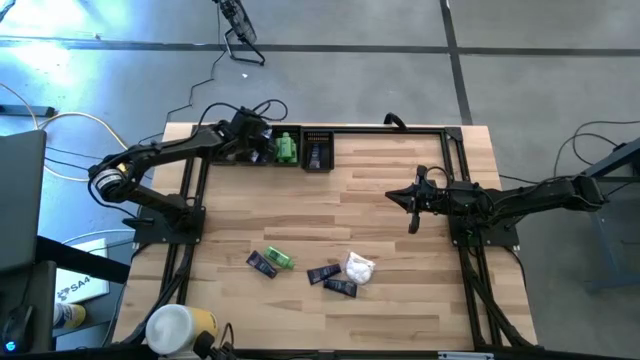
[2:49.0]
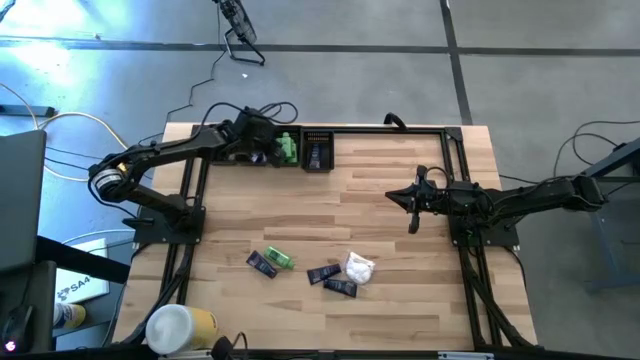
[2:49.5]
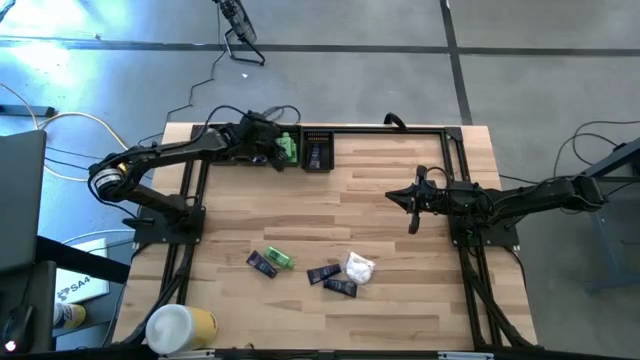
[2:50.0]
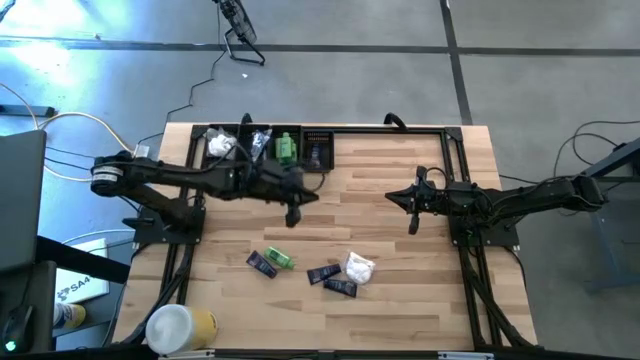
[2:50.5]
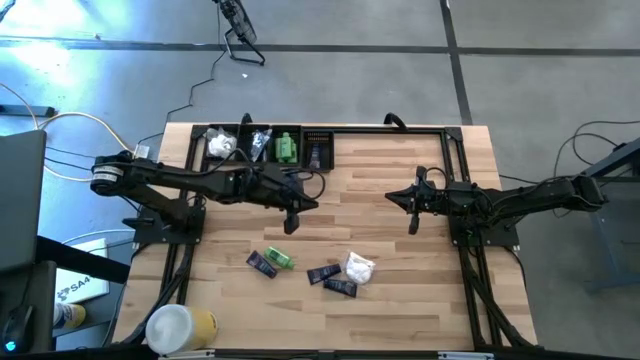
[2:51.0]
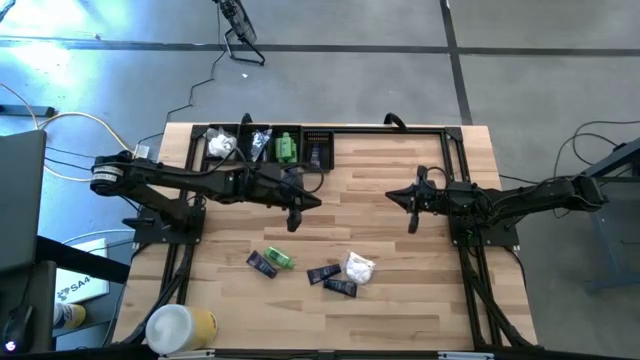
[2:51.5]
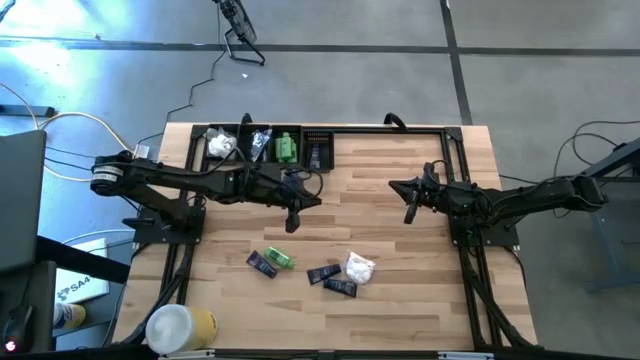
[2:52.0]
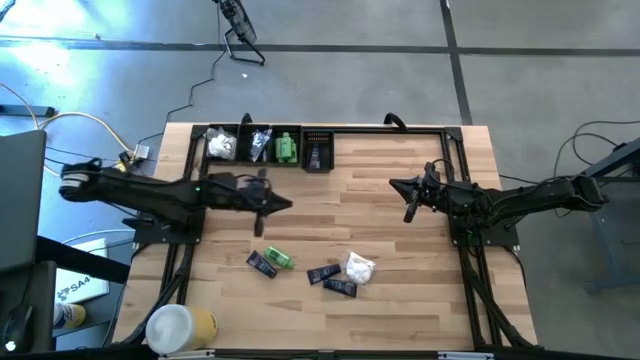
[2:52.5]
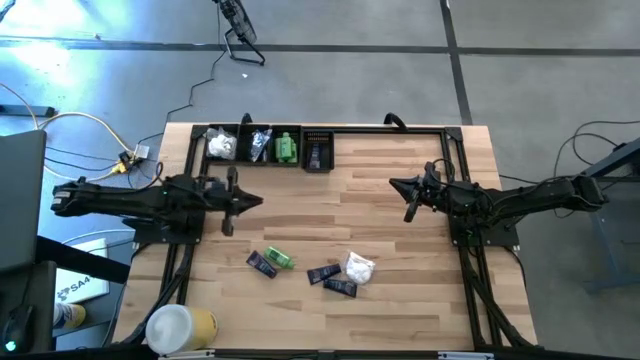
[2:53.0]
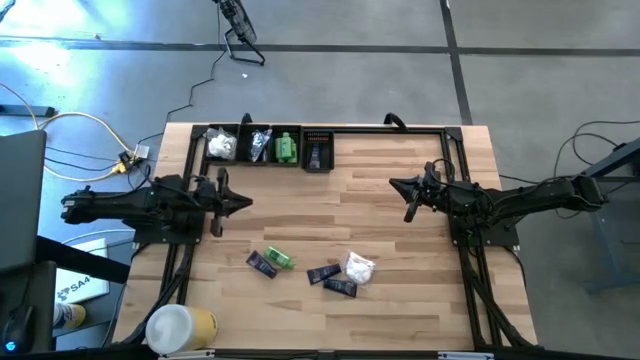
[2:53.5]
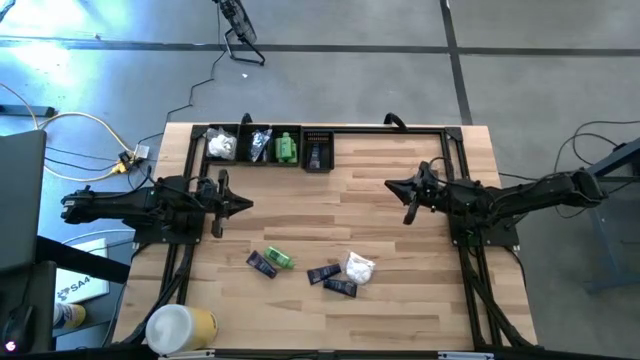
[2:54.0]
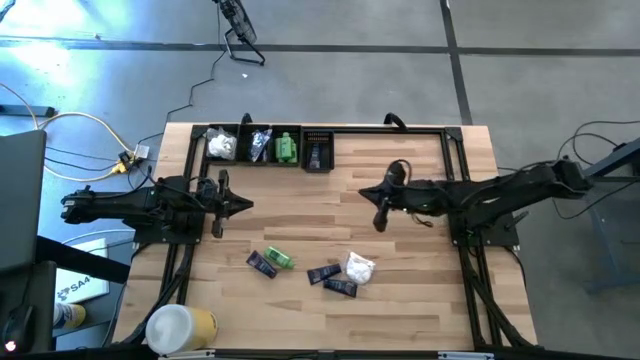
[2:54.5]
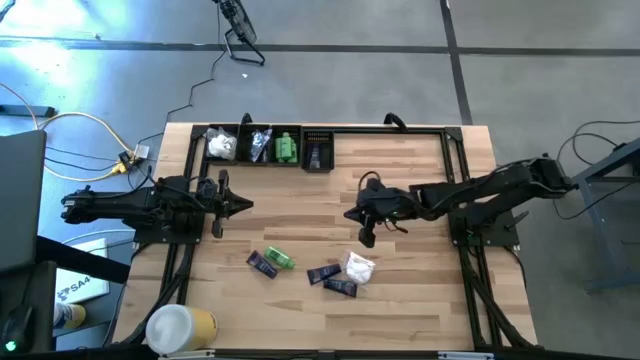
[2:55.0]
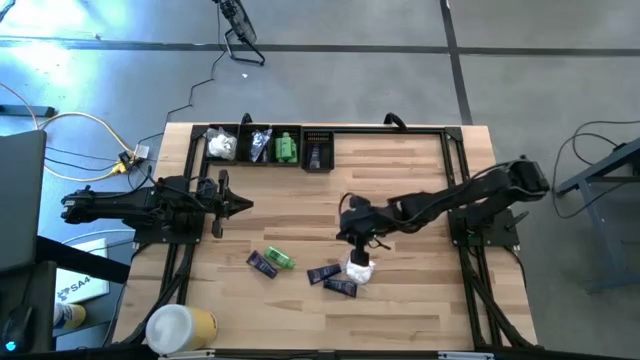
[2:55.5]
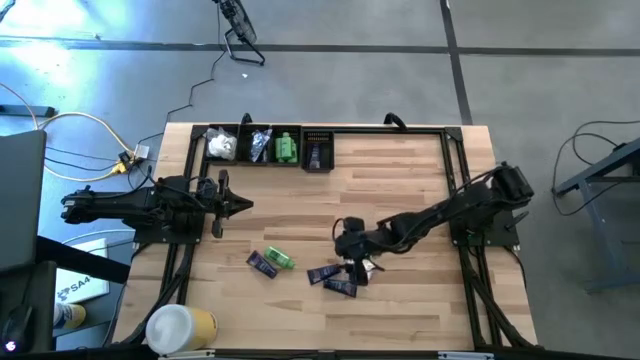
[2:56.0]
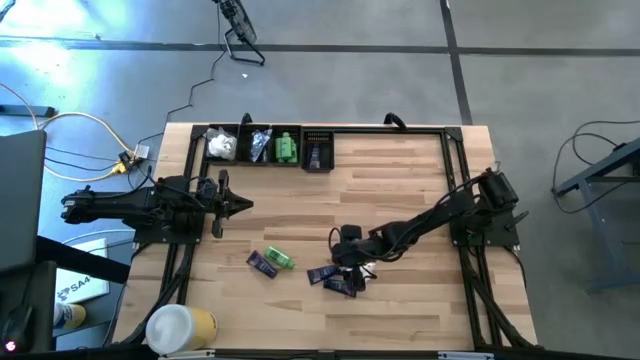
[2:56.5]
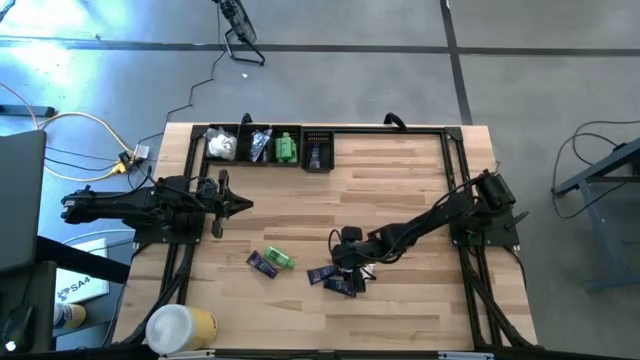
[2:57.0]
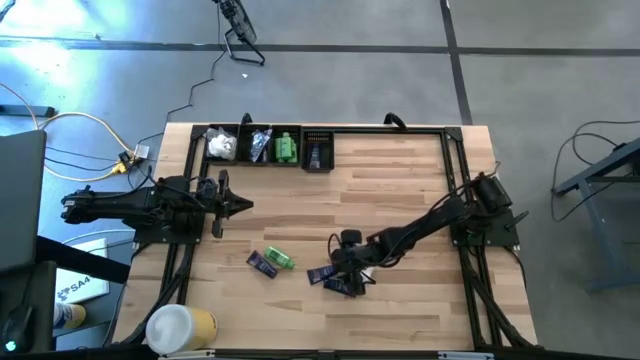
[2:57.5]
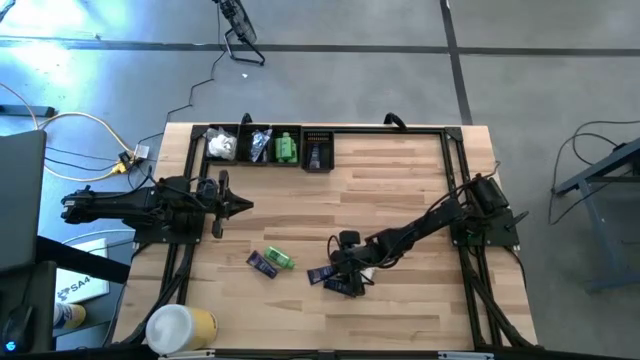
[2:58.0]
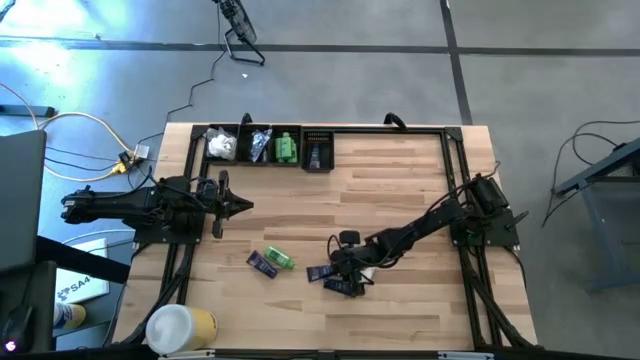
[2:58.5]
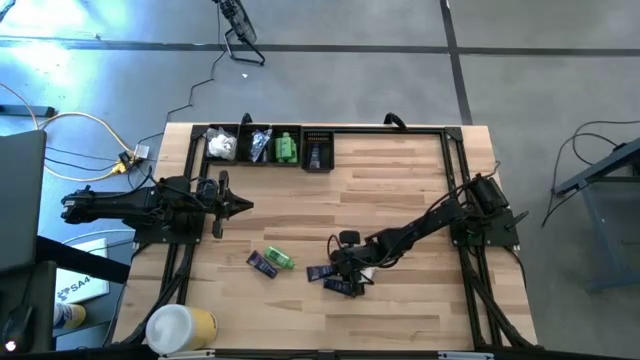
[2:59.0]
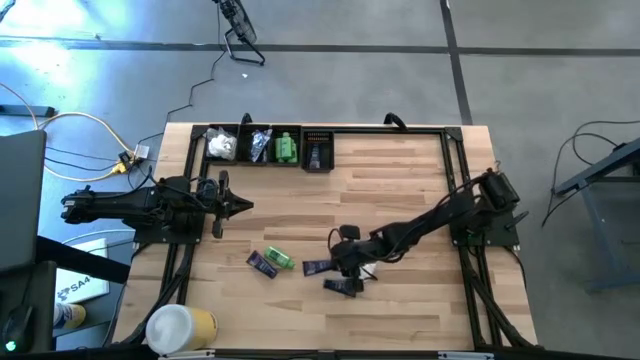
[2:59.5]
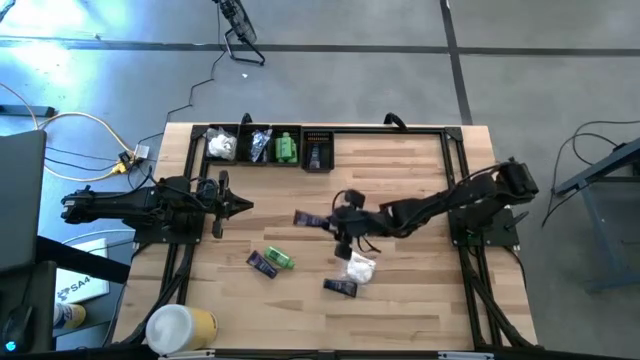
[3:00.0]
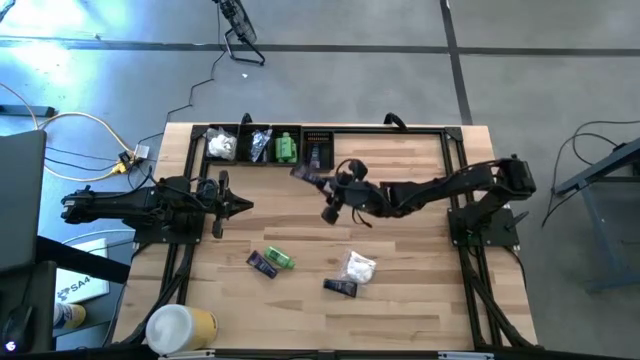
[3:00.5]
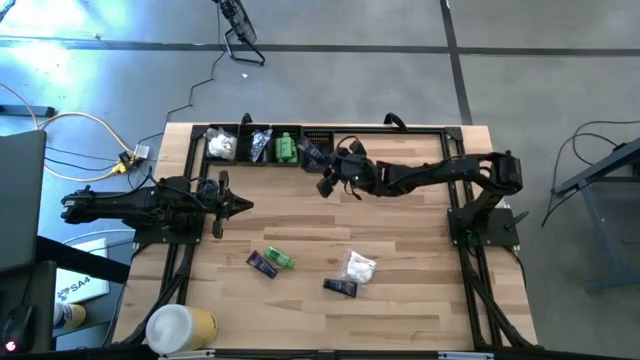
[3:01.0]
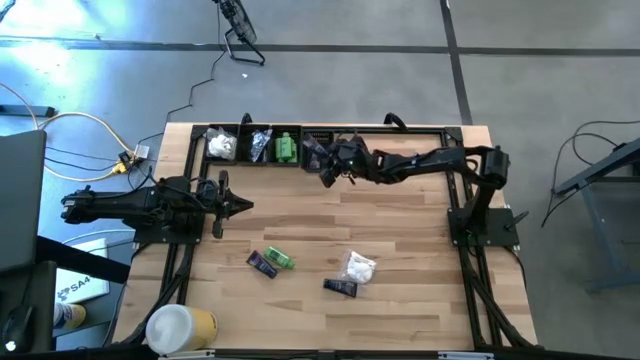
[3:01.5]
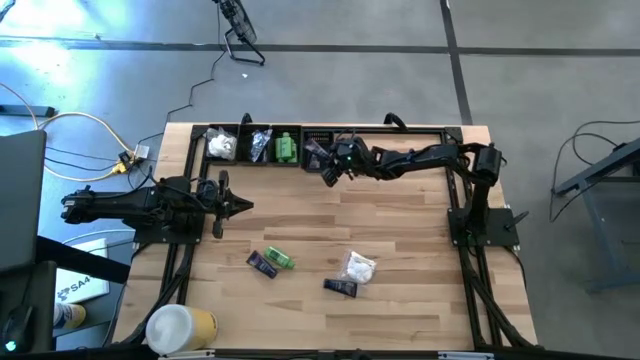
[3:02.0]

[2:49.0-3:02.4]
Task: Pick & Place Travel size toiletries
Put the shave cream into the right black bin

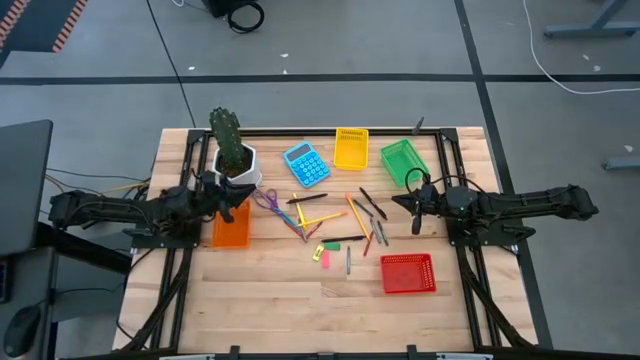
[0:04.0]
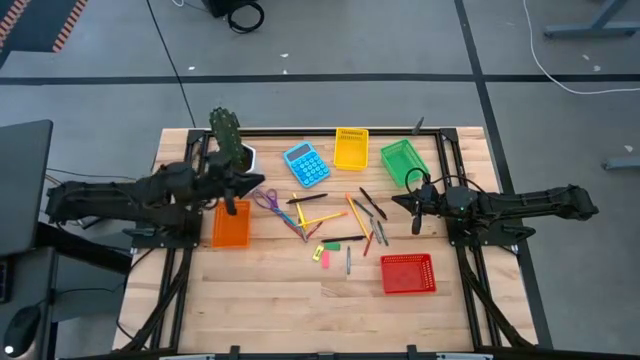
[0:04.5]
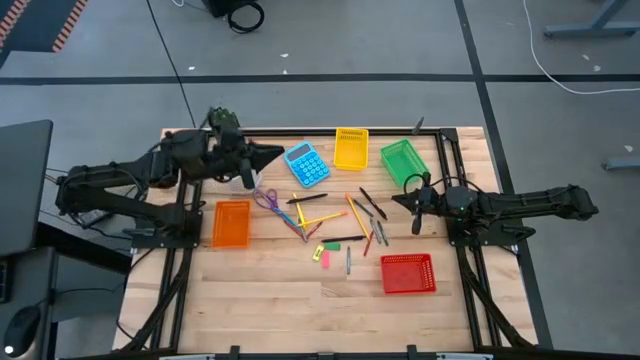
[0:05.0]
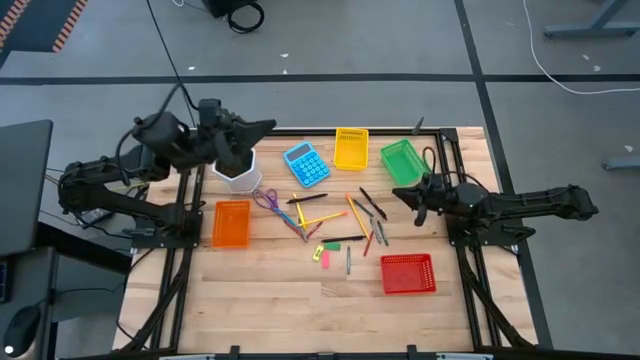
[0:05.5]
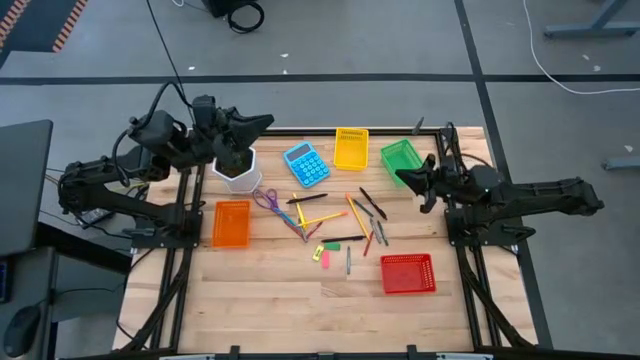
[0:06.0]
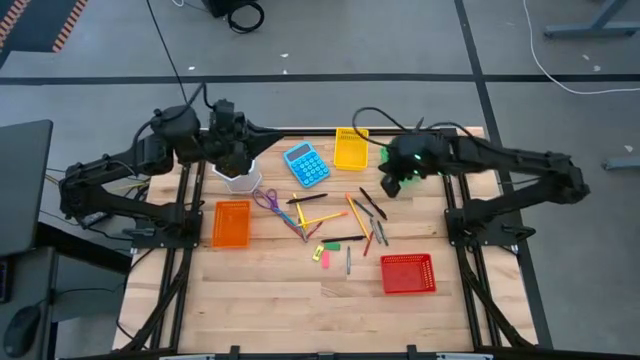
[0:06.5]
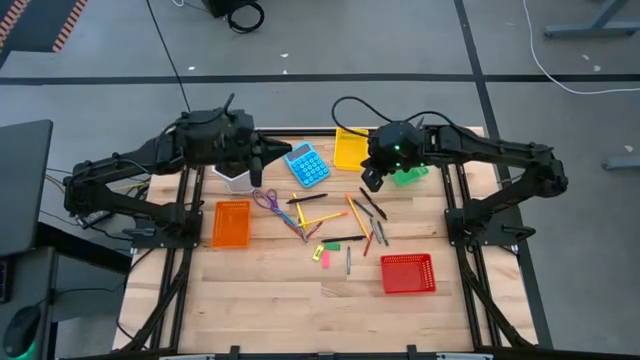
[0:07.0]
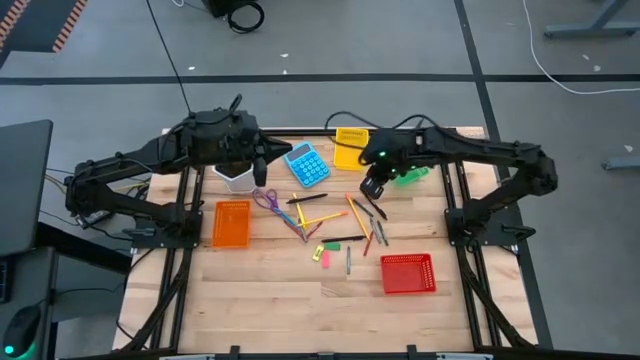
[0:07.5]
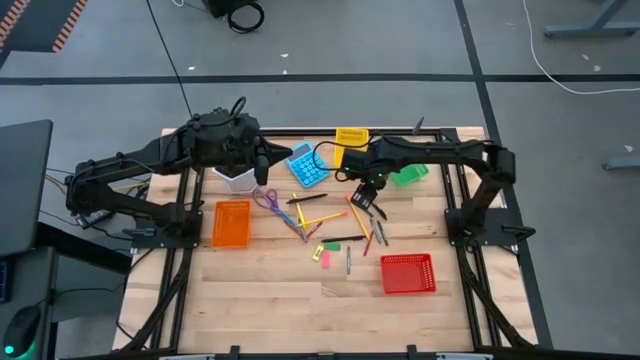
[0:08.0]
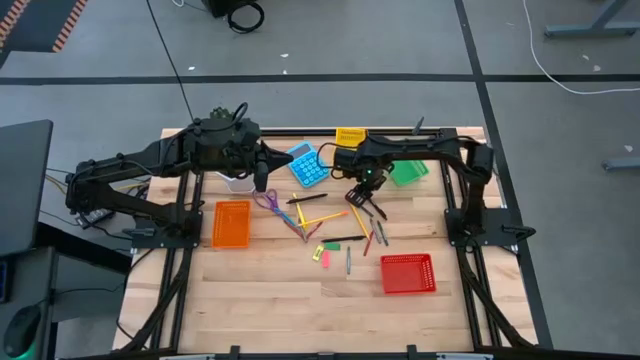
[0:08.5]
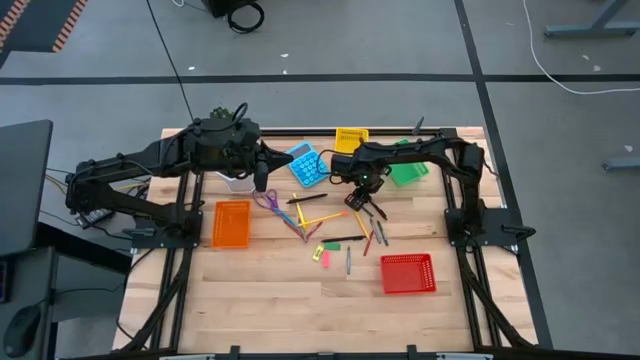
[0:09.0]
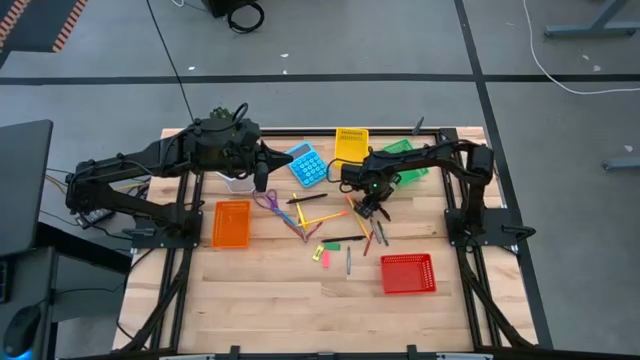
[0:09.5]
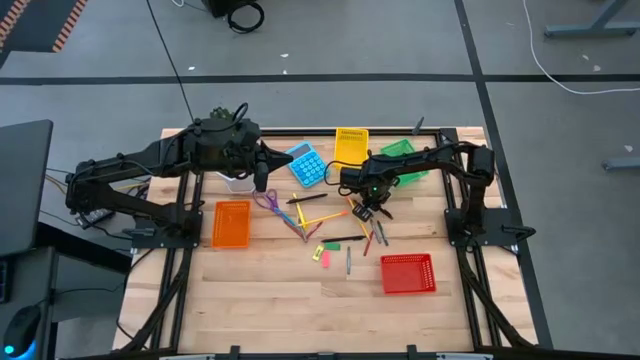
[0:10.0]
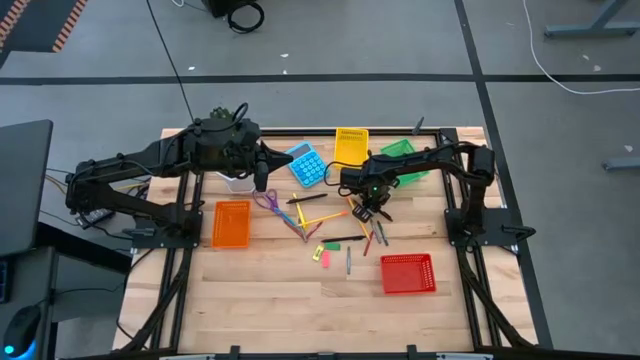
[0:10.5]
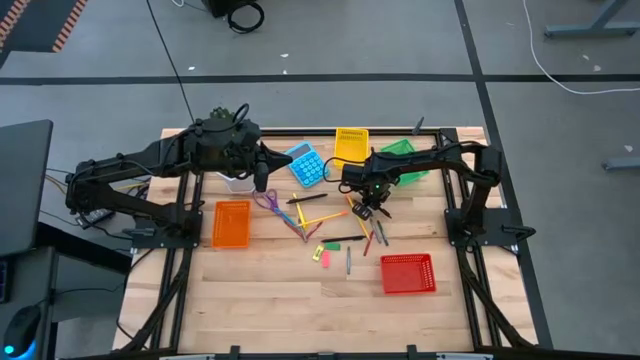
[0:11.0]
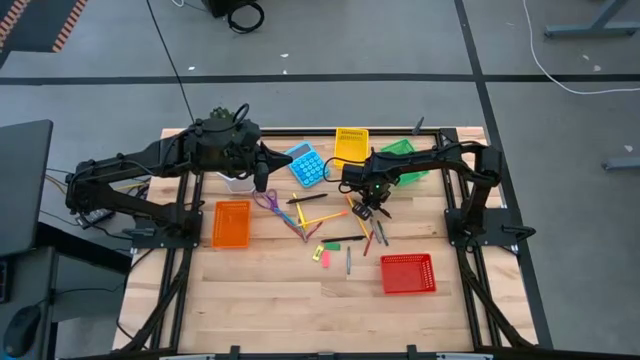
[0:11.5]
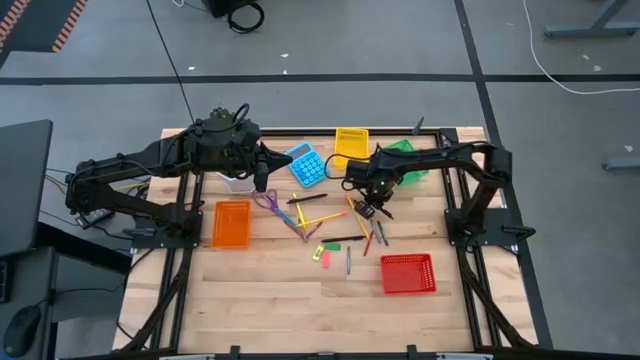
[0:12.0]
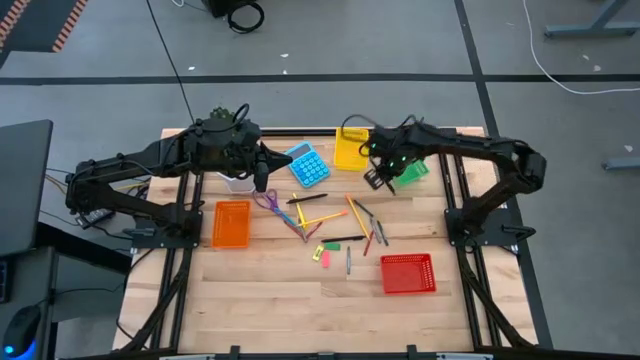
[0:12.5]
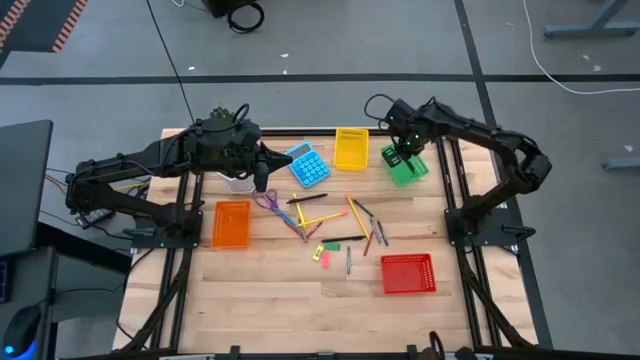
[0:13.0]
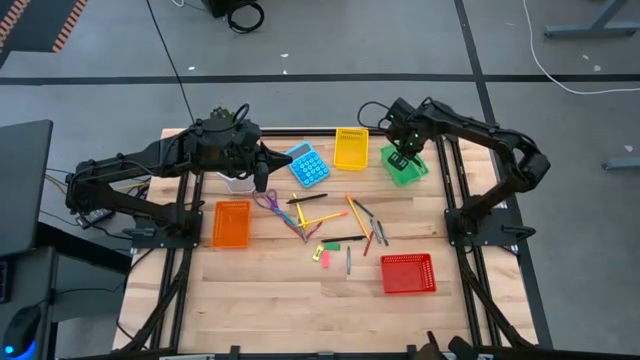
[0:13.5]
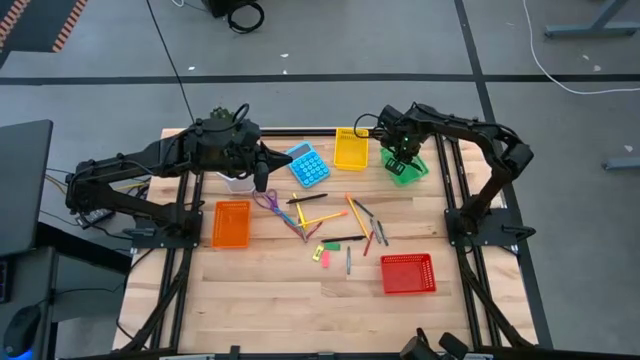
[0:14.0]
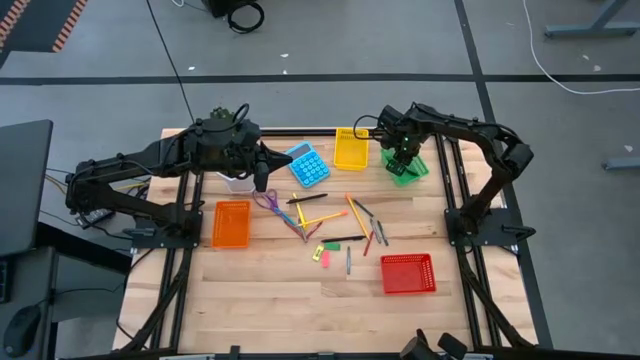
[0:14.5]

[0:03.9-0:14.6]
Task: Sort crayons/erasers/pens/pencils in bins
Put the top right black pen into the green bin
